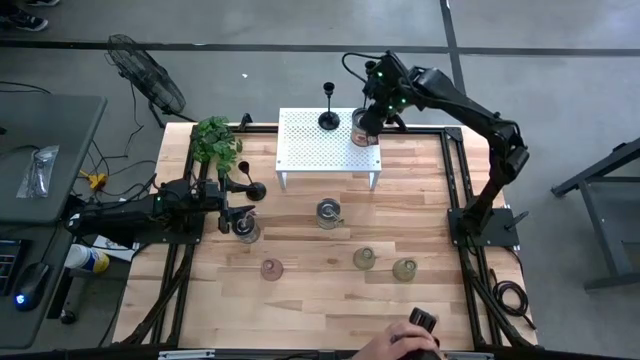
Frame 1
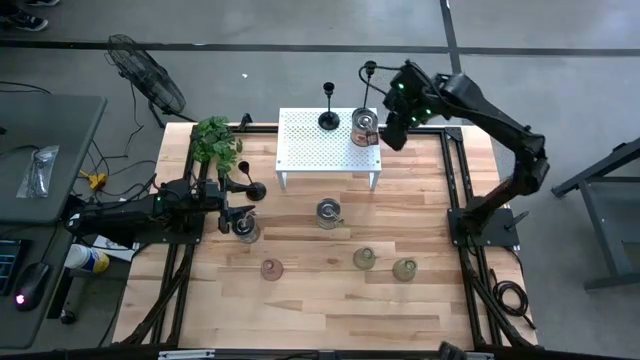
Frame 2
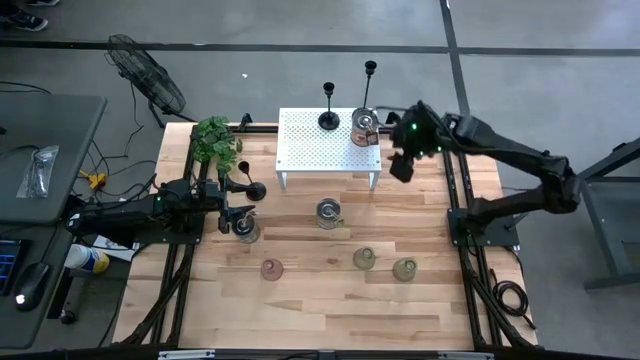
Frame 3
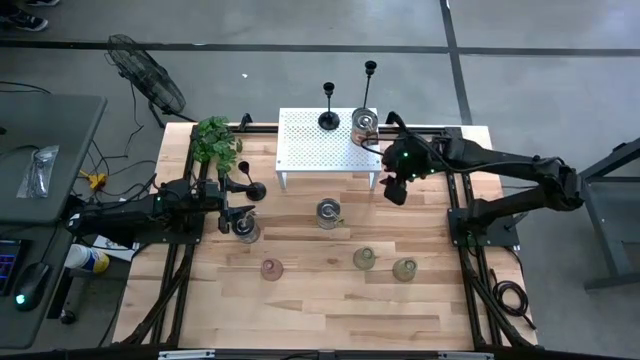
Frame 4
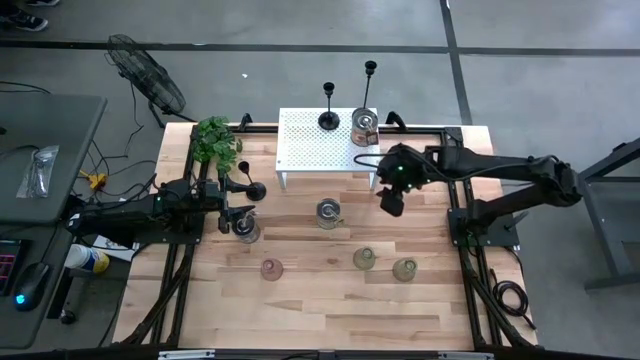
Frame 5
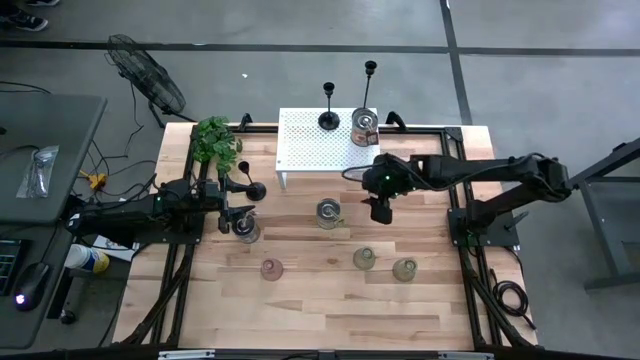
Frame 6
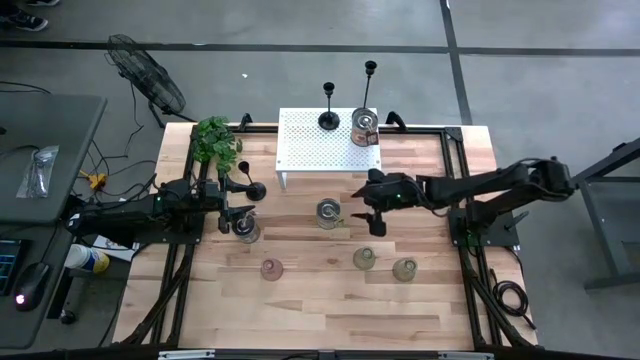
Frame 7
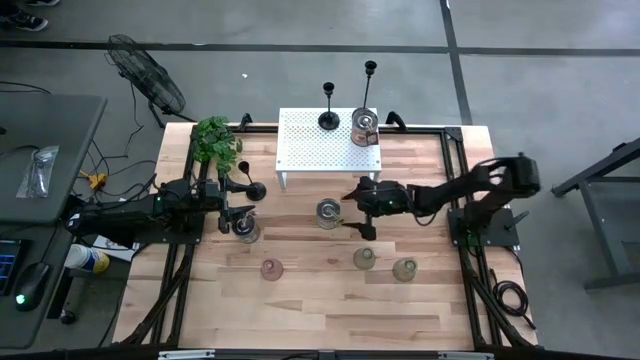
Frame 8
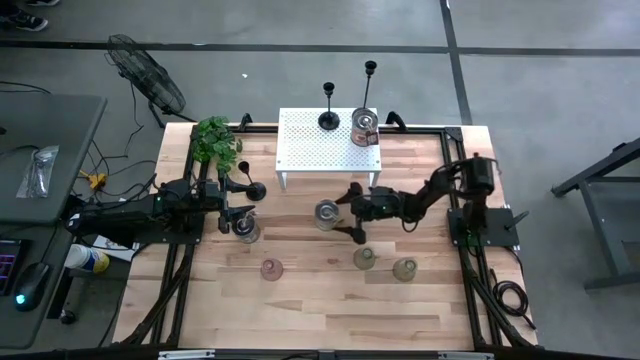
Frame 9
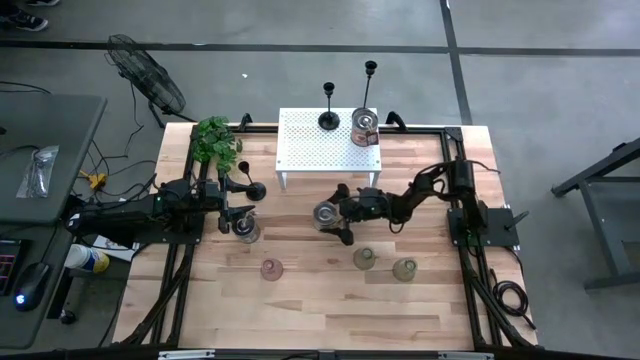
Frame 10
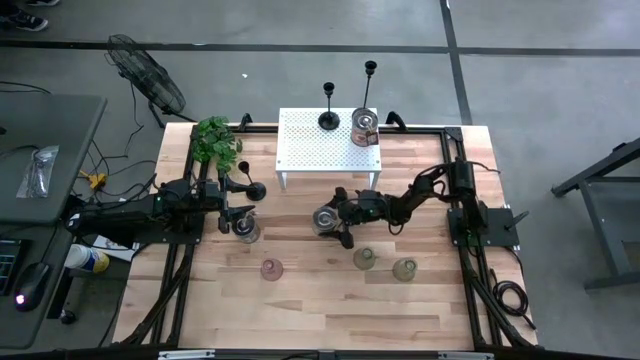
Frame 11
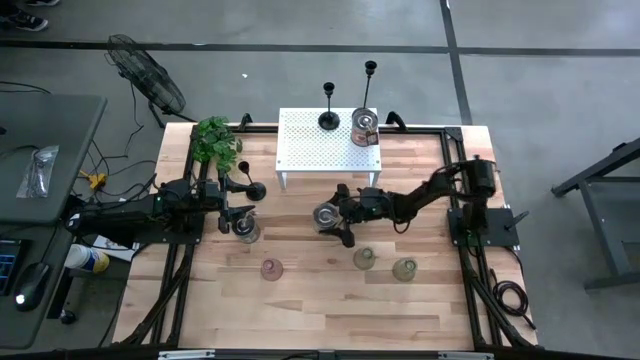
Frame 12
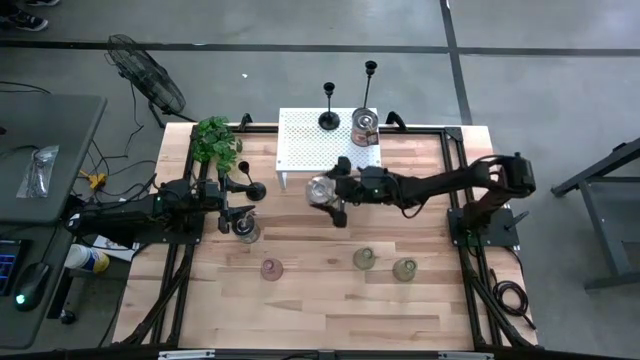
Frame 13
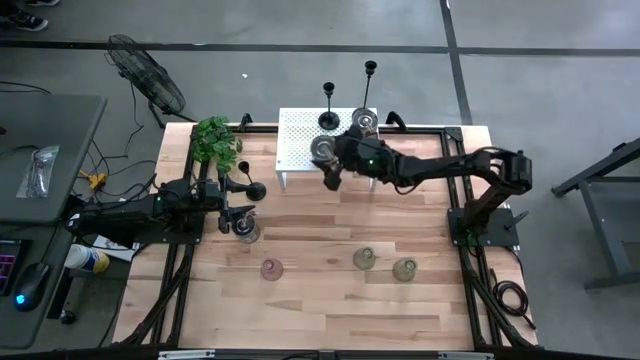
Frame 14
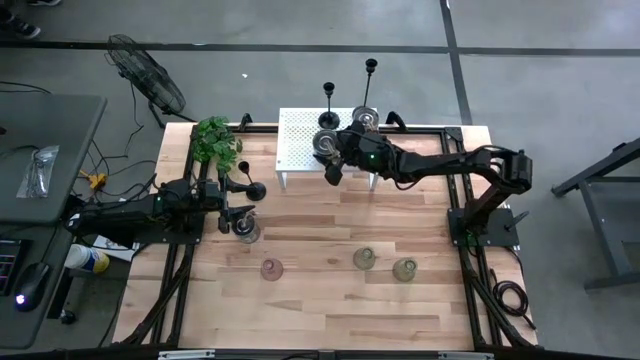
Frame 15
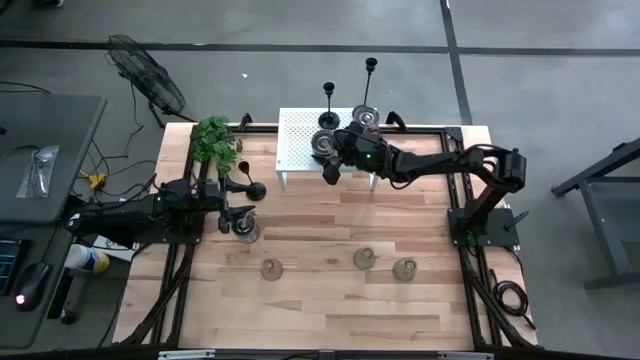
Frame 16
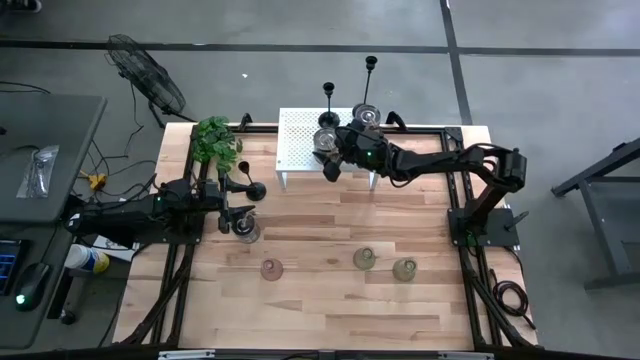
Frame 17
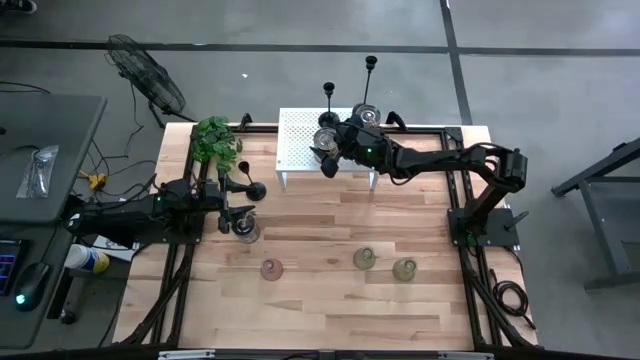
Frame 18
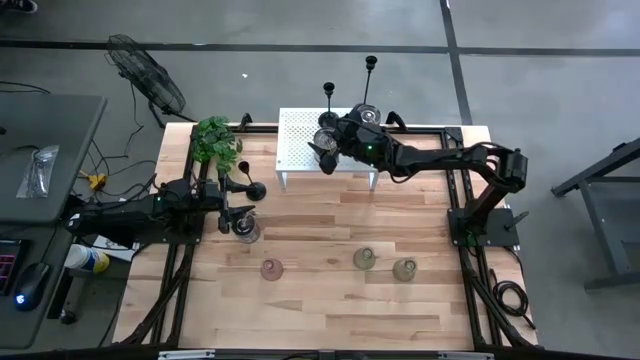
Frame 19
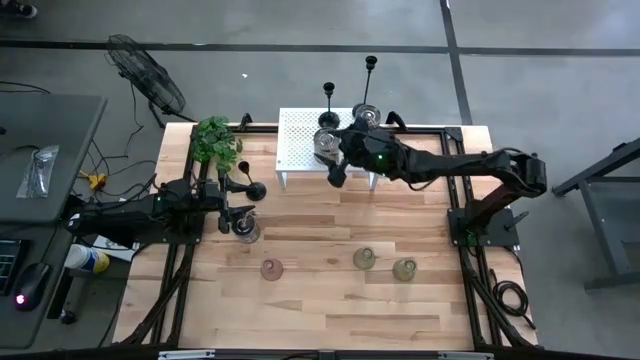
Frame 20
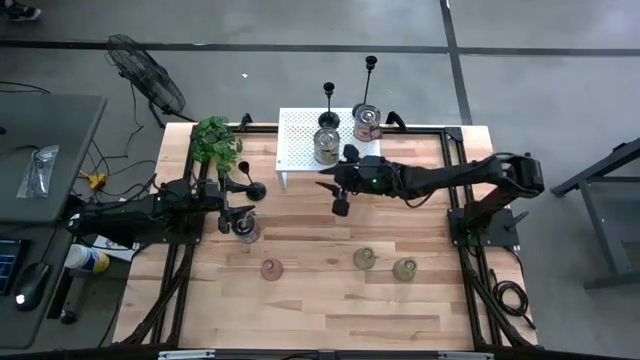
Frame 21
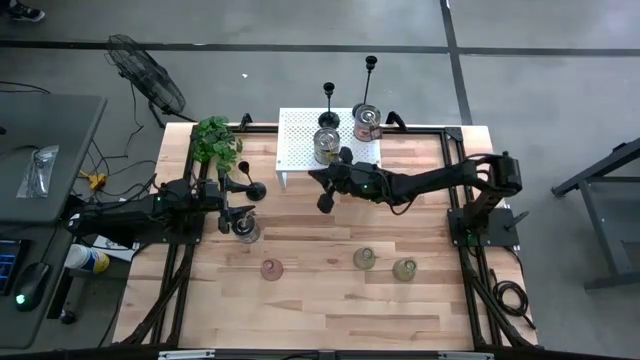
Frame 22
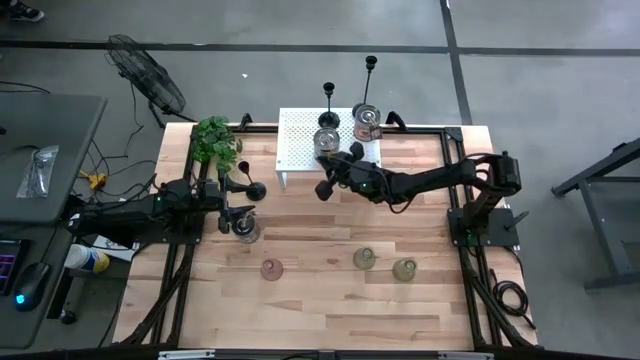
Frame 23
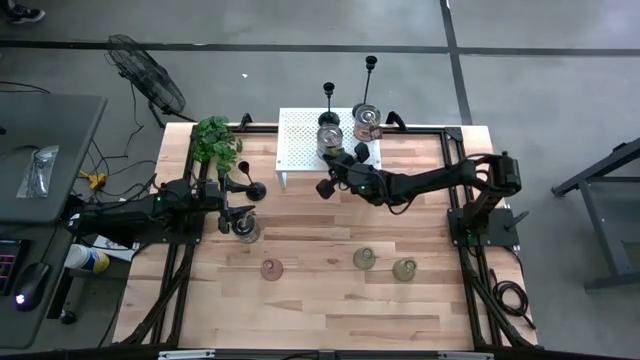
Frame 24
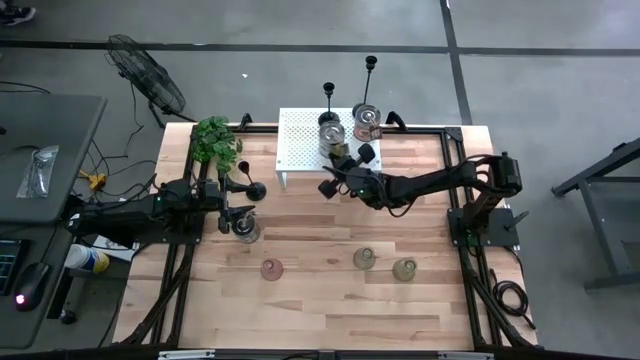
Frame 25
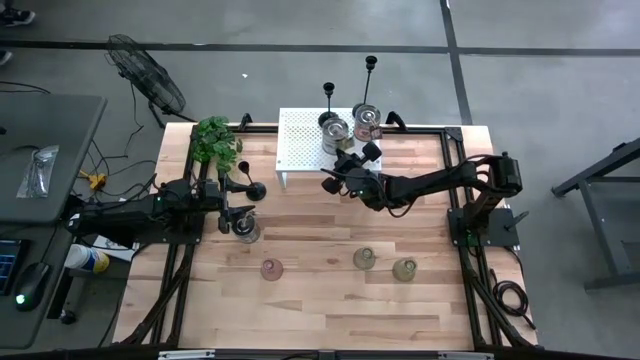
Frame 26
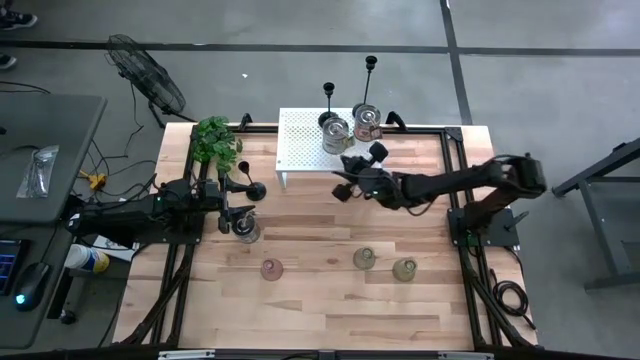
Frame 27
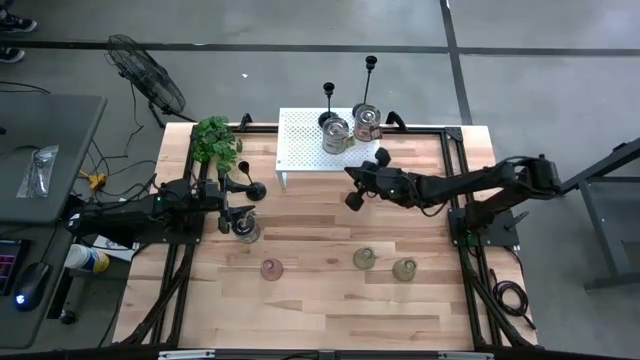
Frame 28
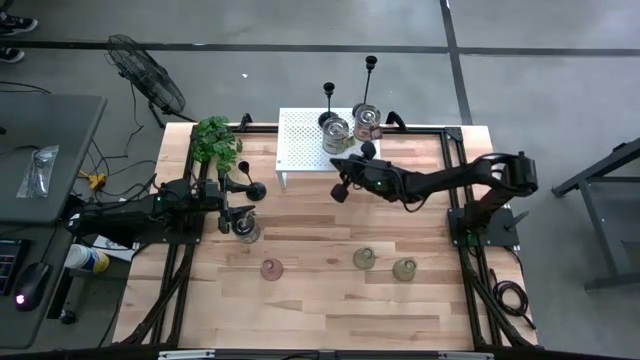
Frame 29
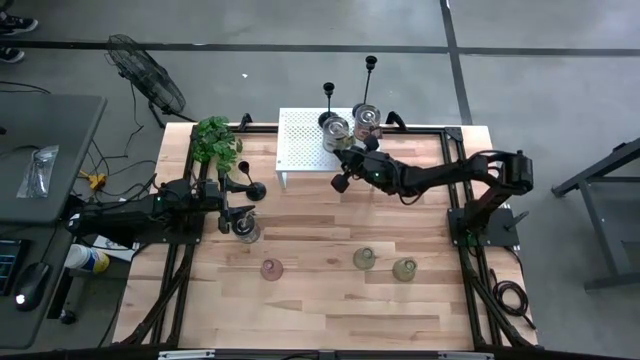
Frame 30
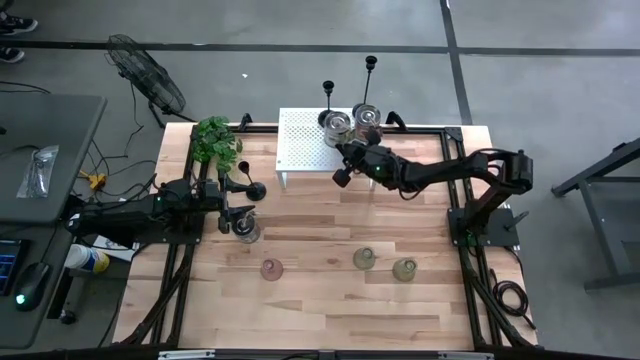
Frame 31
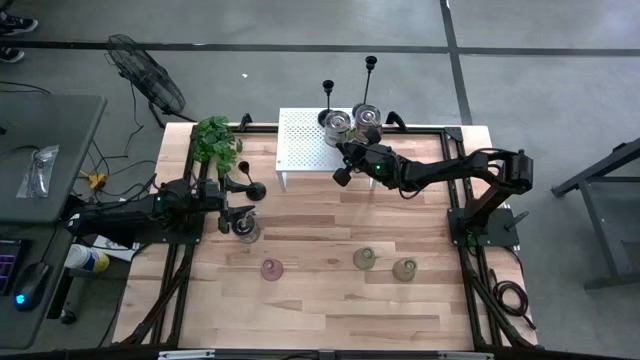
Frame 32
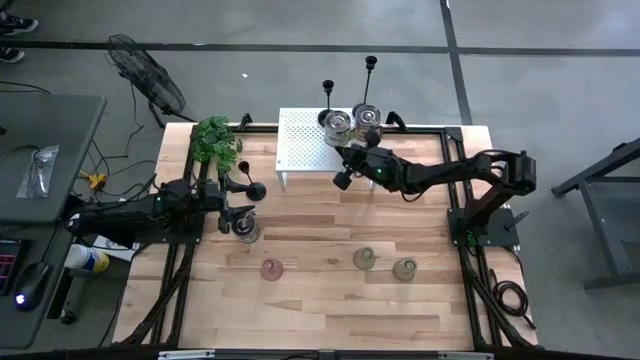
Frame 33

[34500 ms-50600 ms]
Task: Pick & Place candle stick holders
Put the light green scented candle on the shelf

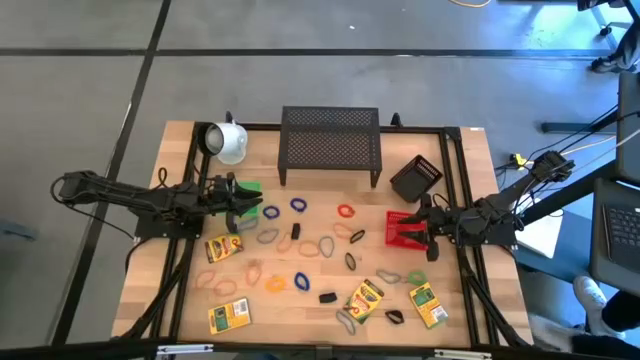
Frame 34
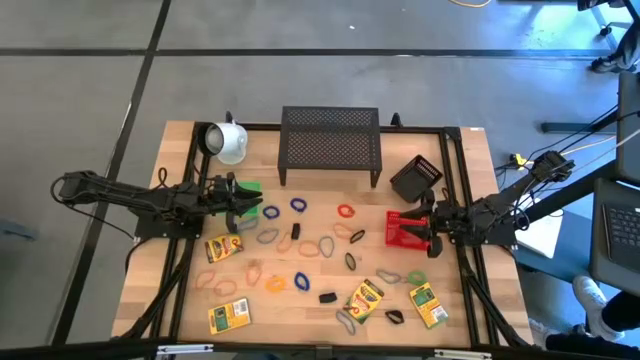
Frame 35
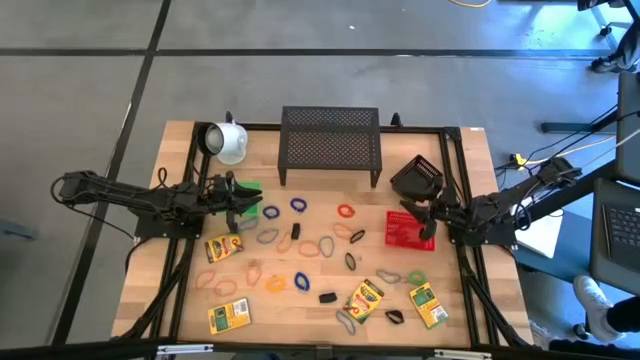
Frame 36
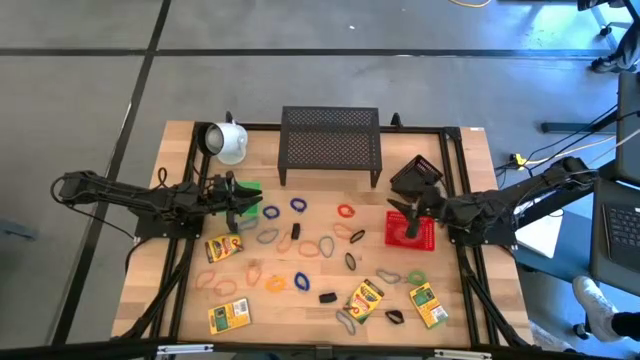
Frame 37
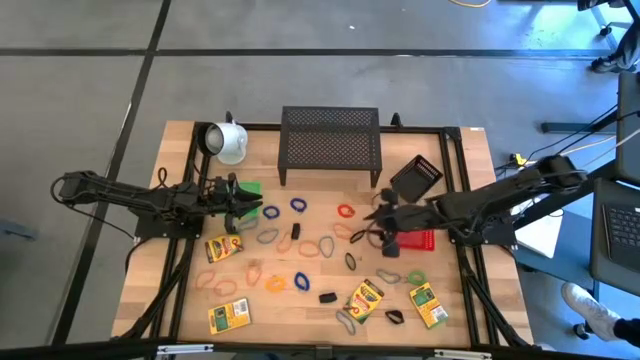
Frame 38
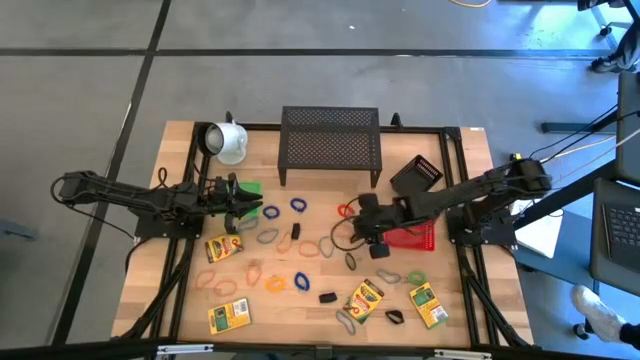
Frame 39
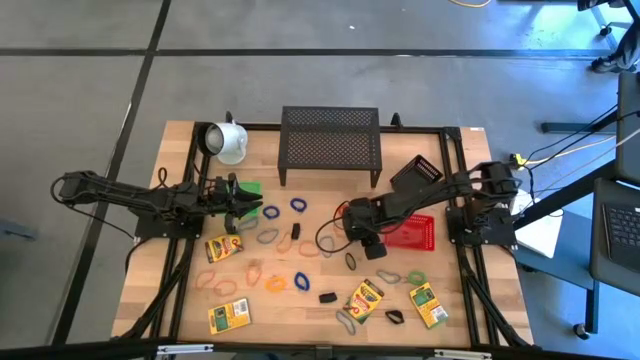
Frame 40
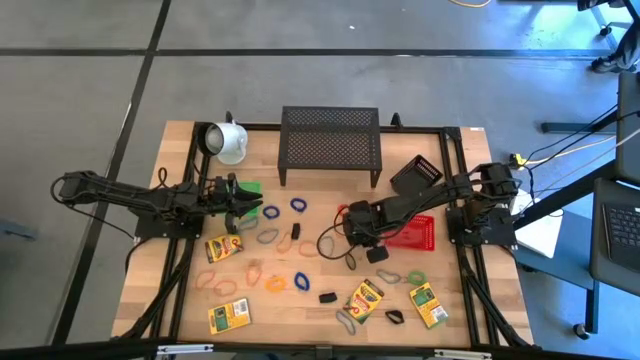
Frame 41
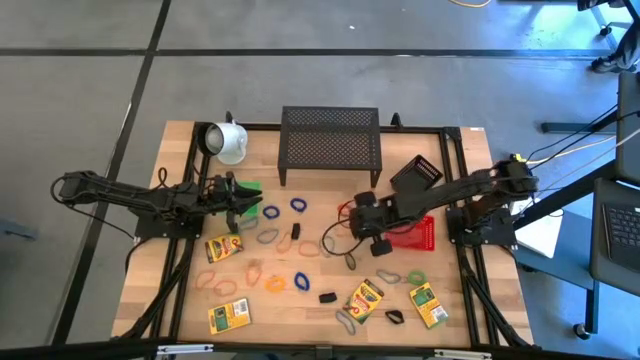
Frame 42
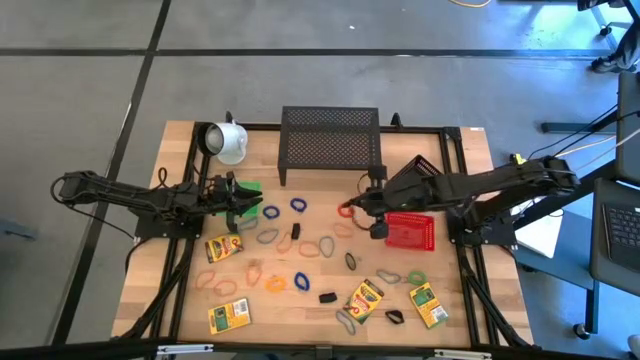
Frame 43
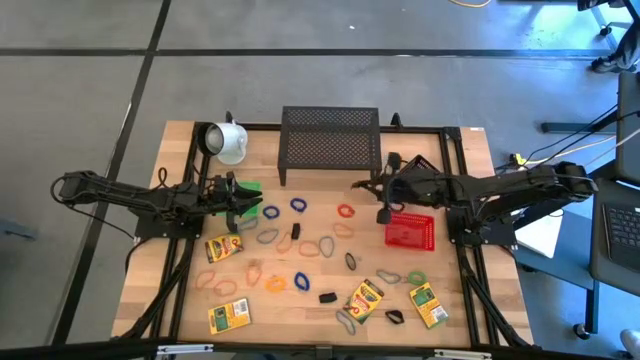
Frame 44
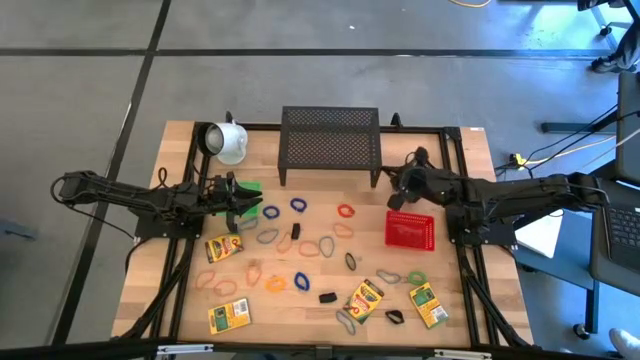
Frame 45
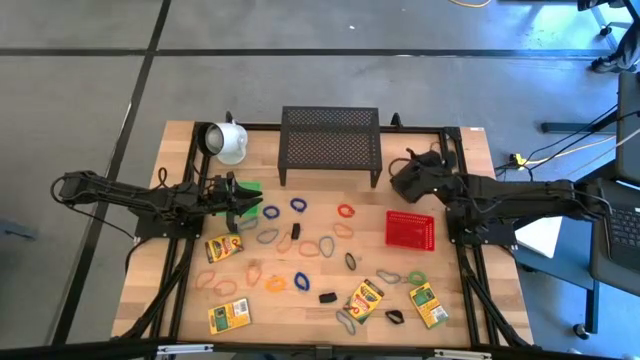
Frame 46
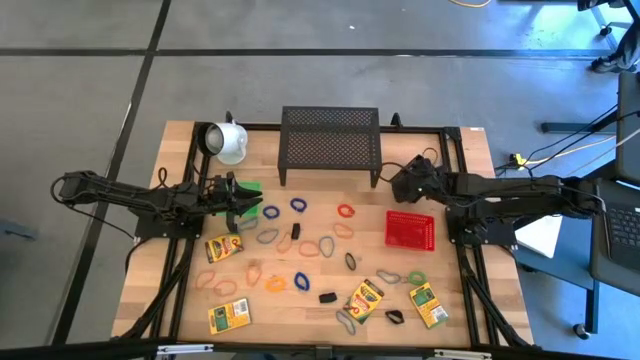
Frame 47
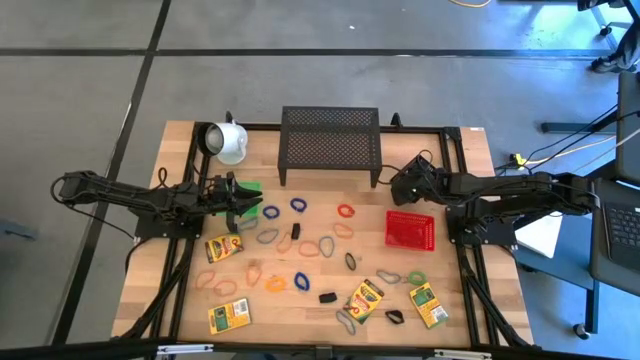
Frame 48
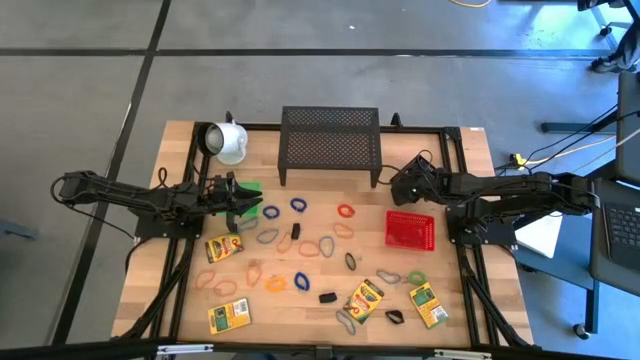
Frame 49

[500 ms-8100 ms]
Task: Pick & Place Office Desk Supplies
Put the black rubber band band into the black bin
